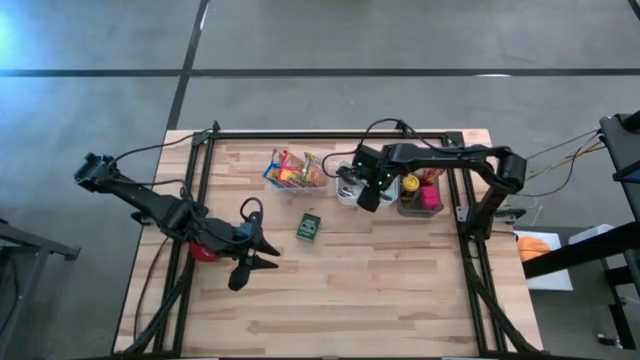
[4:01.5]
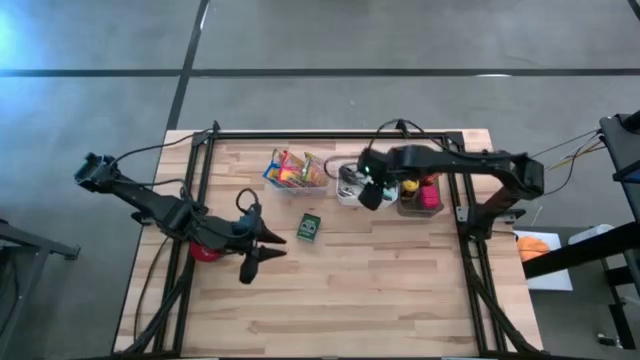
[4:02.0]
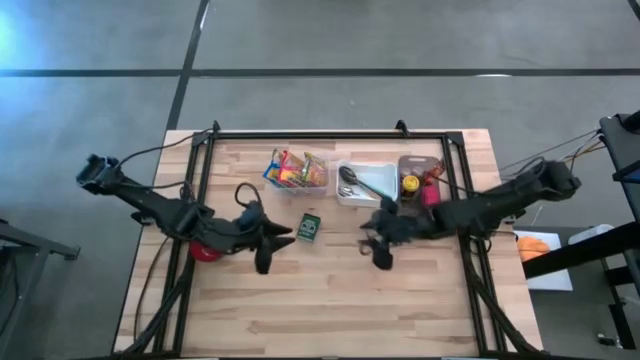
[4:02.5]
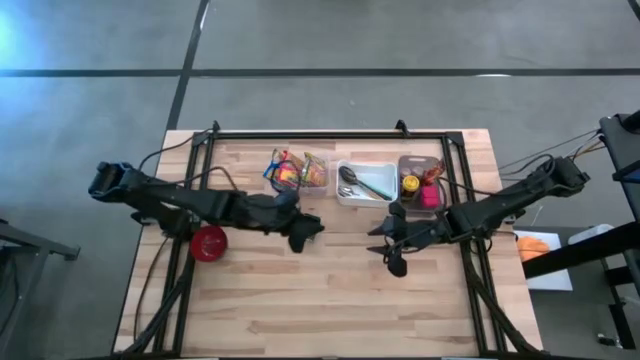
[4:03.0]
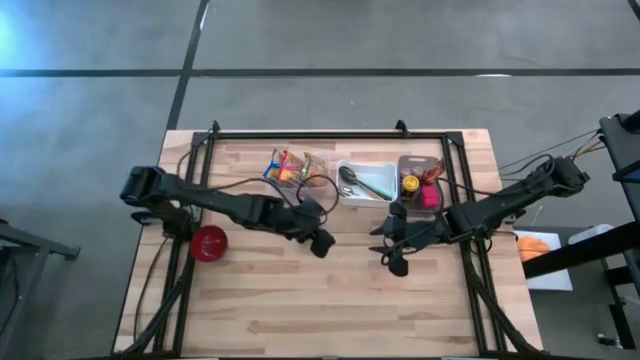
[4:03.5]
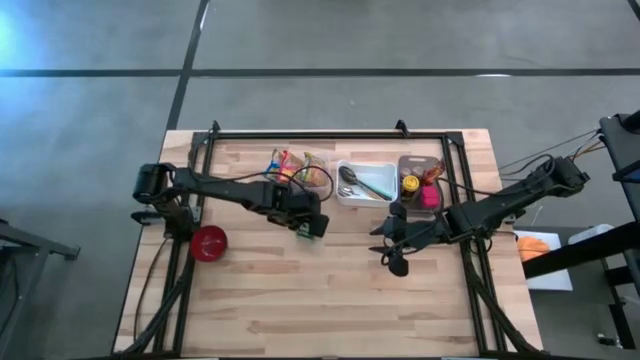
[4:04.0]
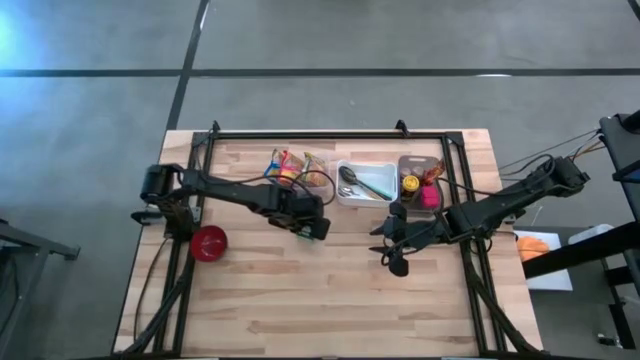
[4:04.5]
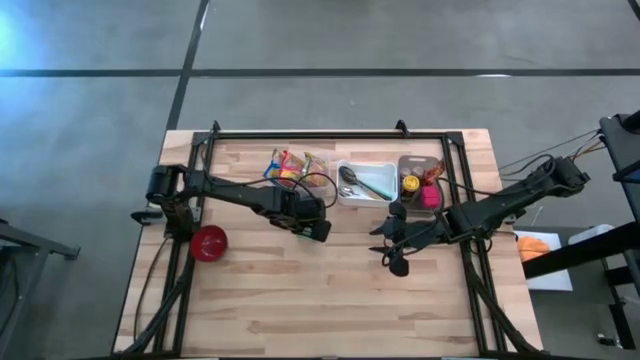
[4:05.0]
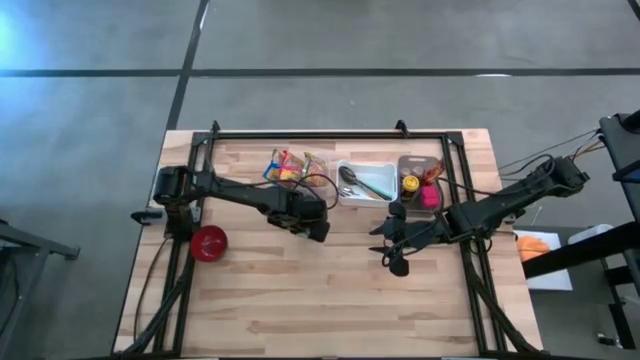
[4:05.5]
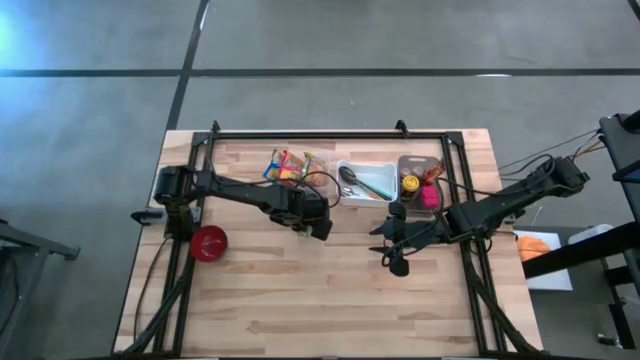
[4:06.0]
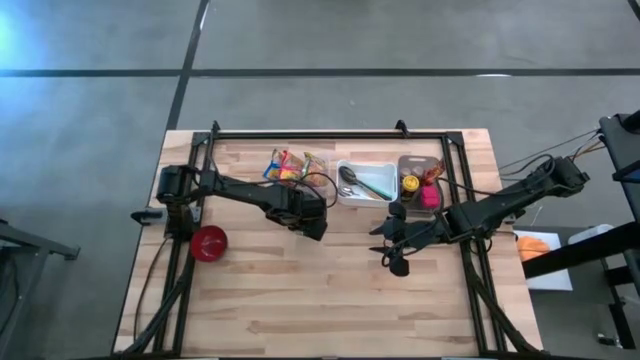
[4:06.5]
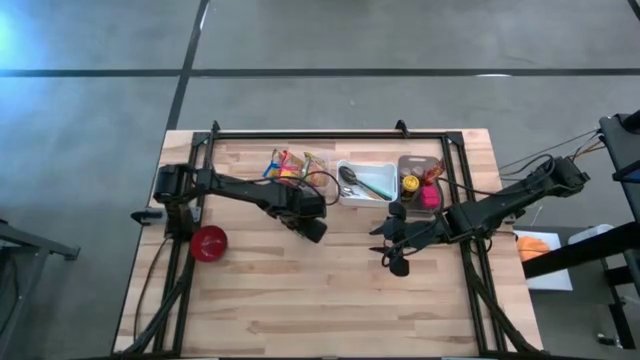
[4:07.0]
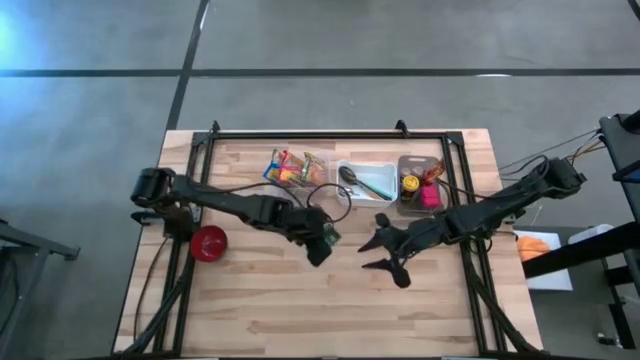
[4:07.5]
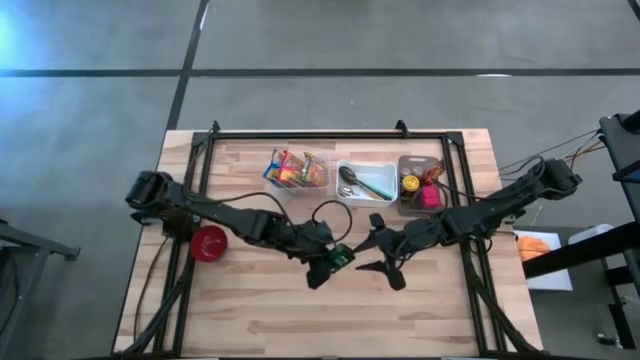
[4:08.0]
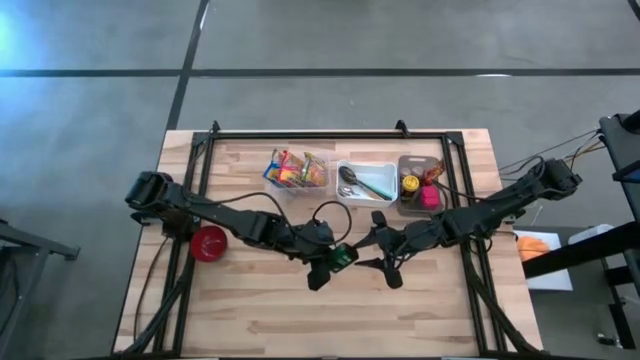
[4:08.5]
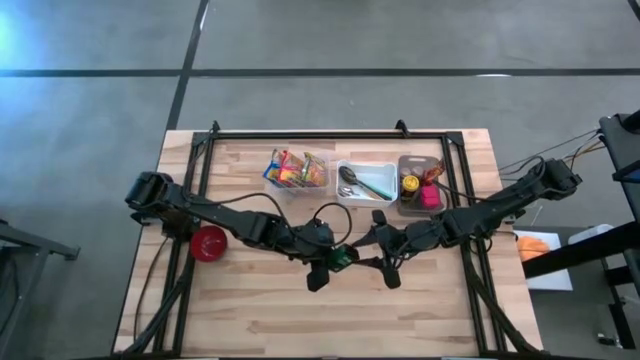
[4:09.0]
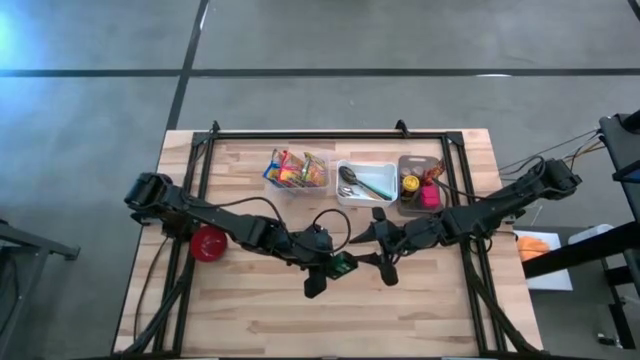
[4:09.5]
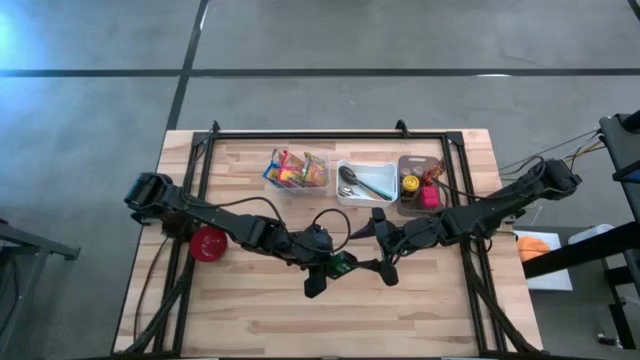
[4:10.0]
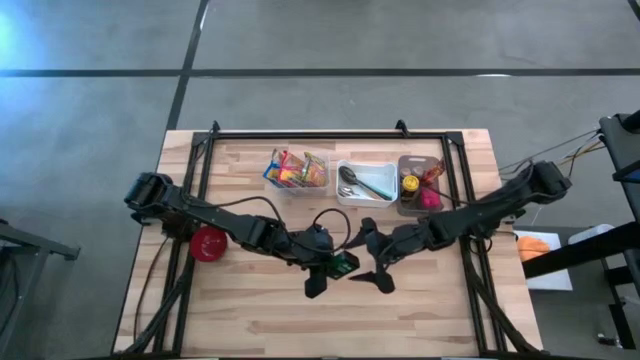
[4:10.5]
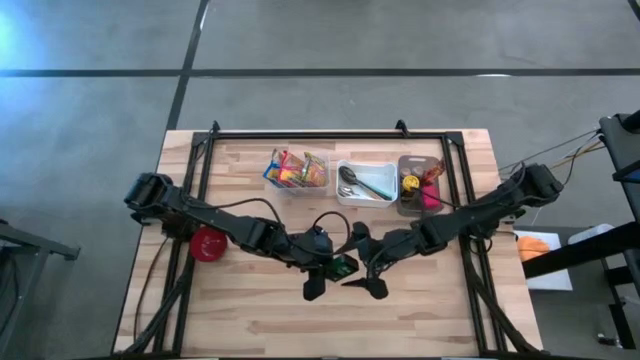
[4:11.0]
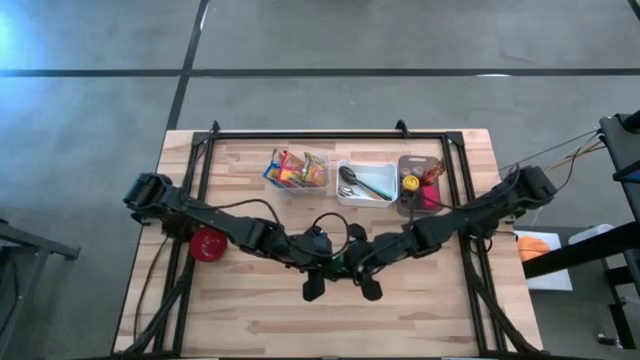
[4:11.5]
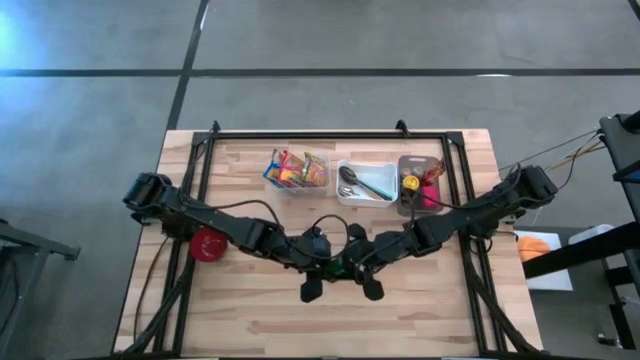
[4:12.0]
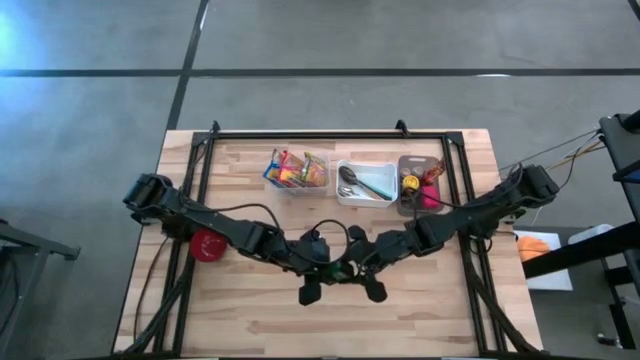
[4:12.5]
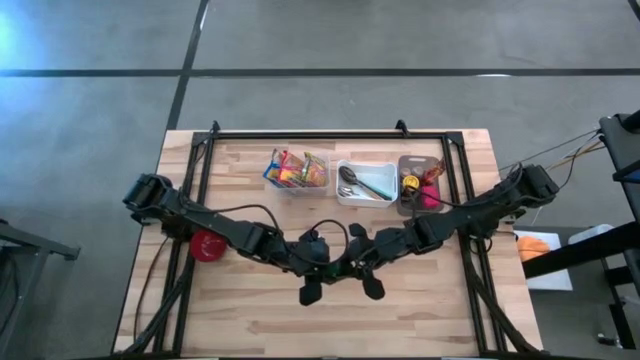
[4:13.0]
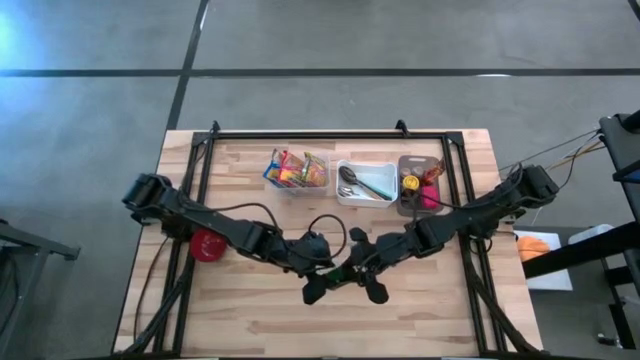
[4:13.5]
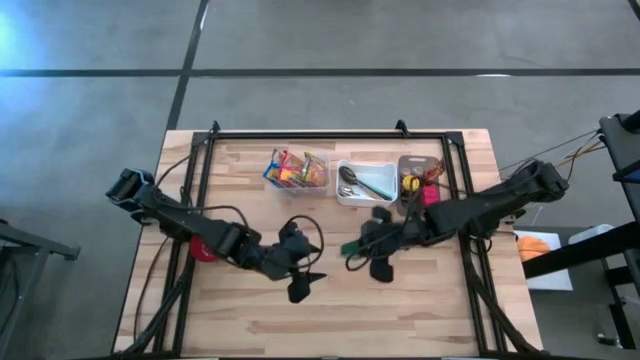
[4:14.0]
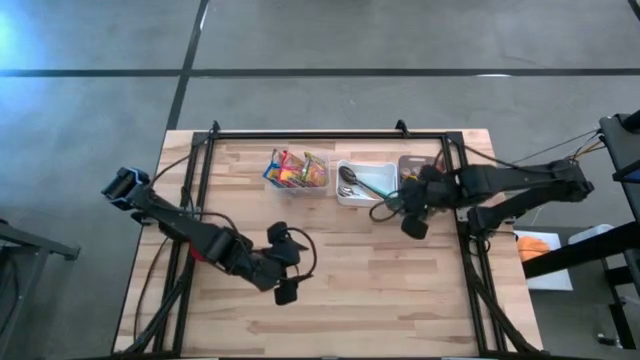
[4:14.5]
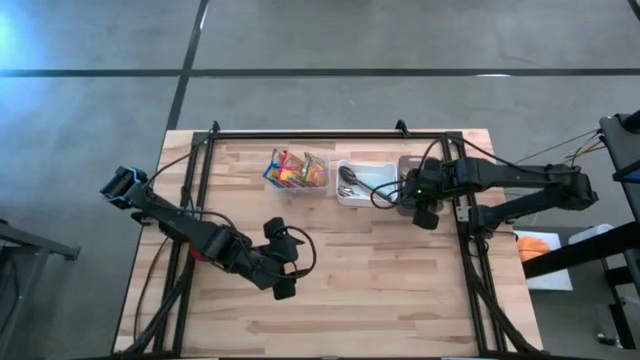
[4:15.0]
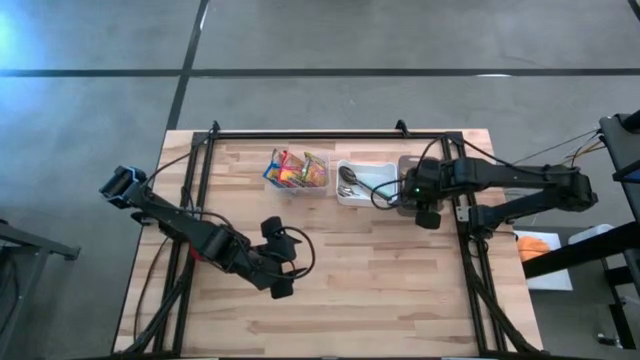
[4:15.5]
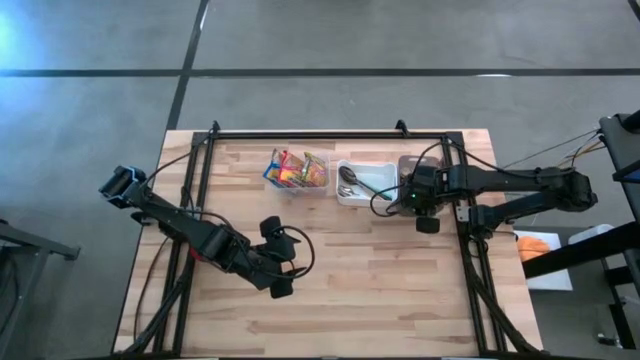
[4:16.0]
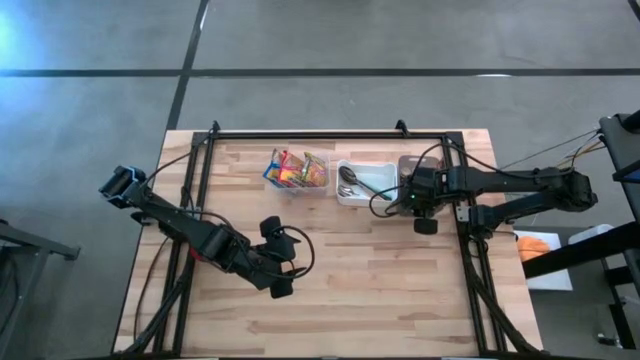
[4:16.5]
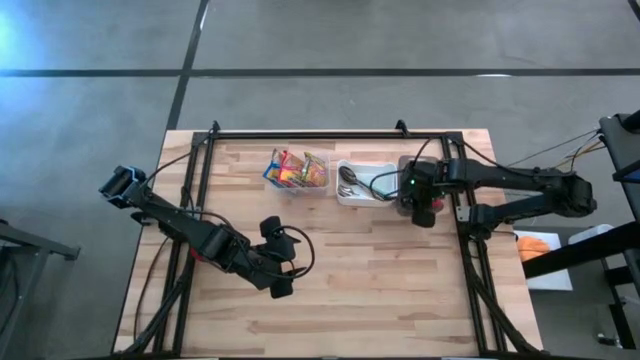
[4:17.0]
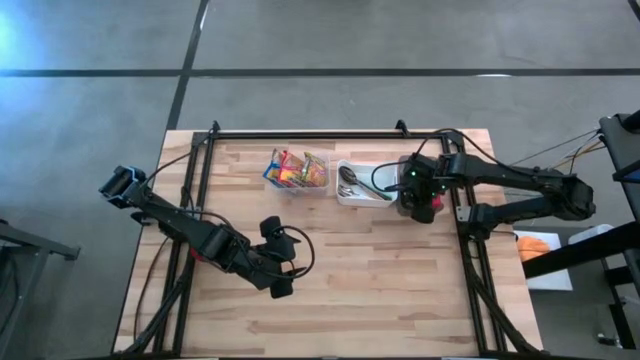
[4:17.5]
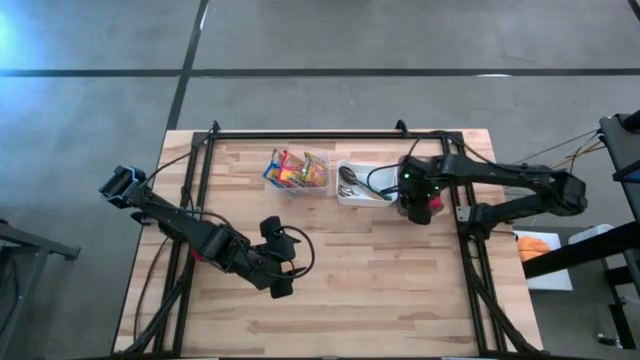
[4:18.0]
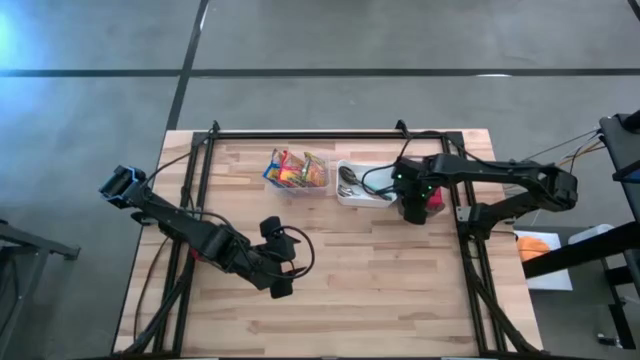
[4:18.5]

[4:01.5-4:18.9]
Put the black seasoning can into the black bin

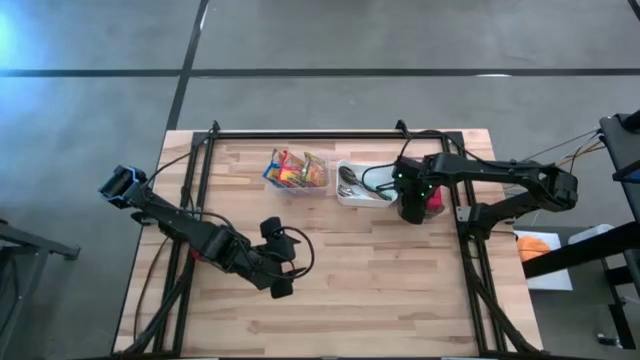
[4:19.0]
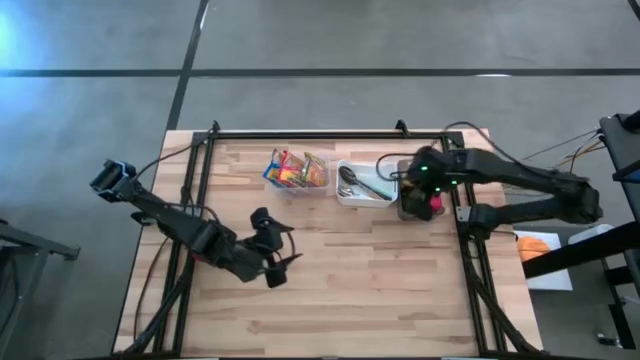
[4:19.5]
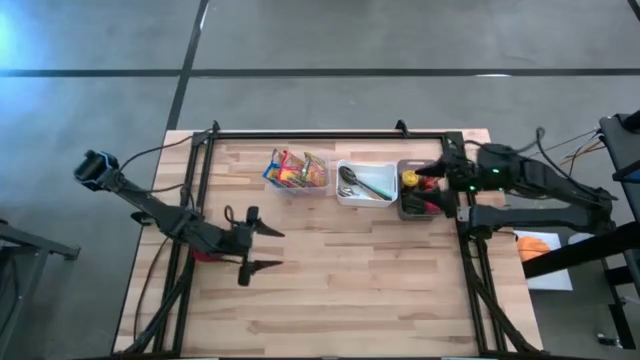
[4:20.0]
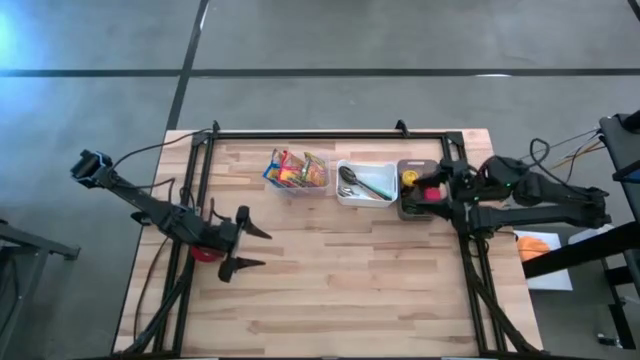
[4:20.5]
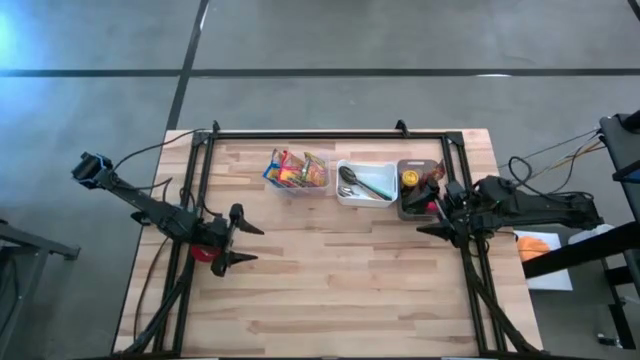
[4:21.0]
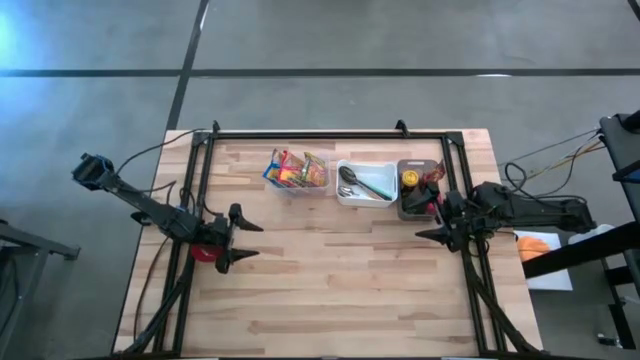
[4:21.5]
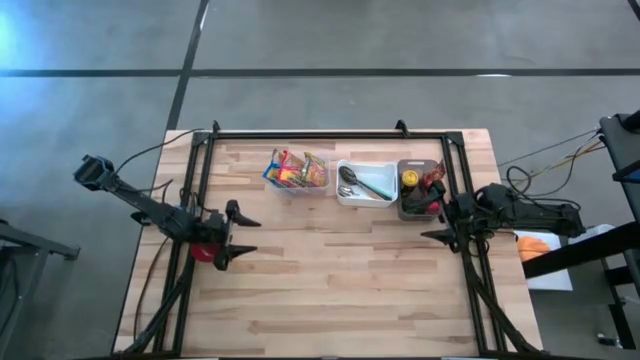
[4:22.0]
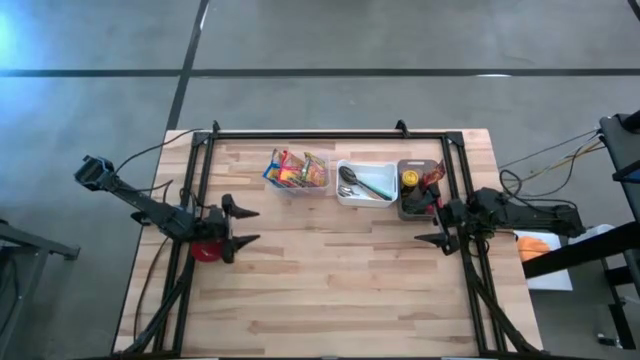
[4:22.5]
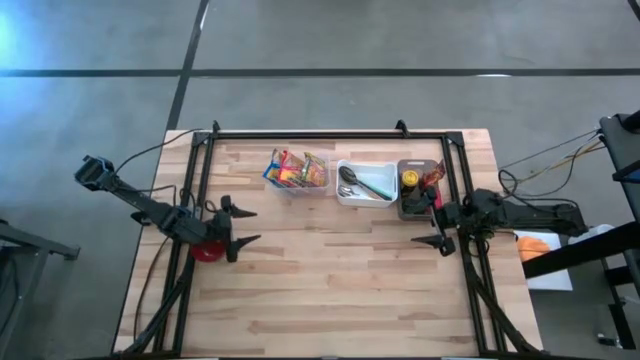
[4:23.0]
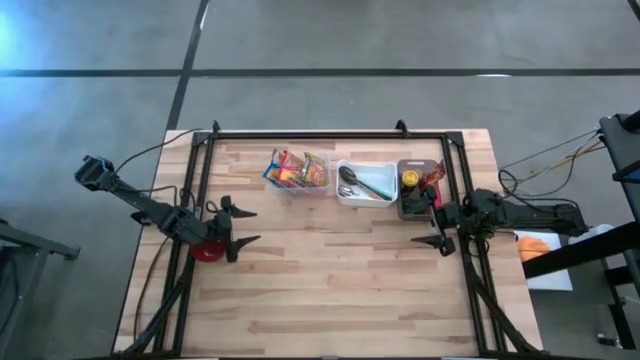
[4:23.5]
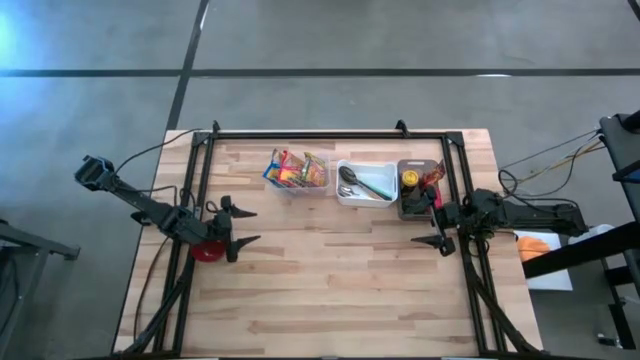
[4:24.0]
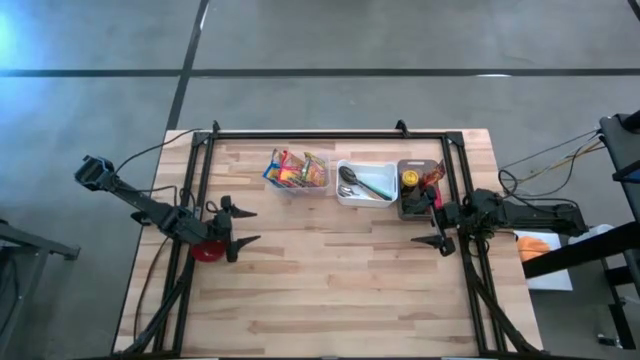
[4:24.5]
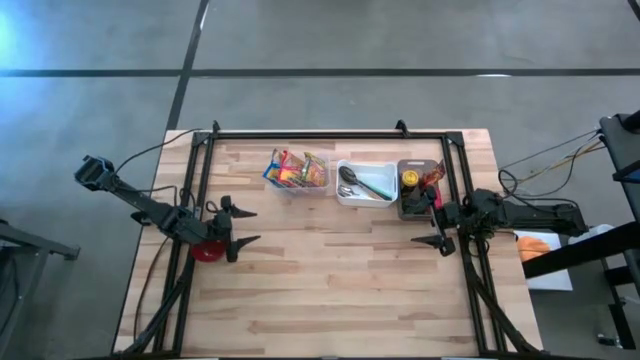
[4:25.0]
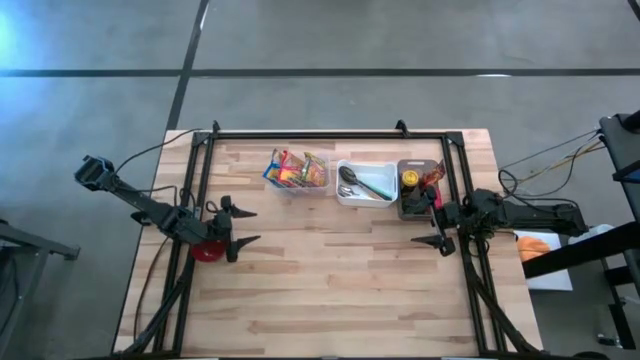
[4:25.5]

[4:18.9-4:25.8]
Return to Home Position
